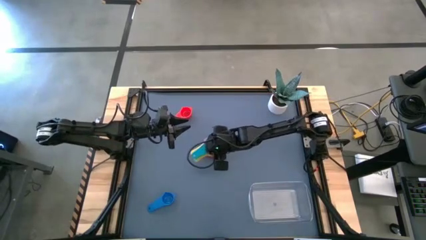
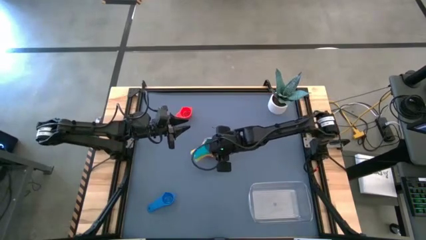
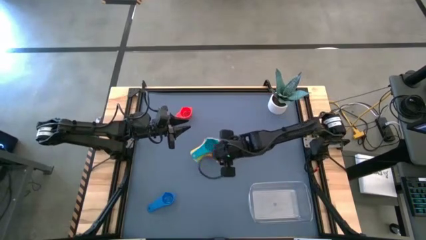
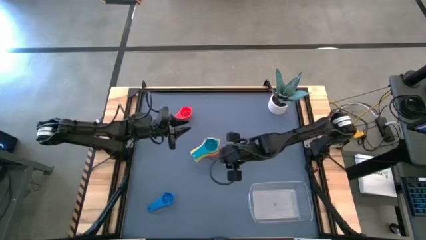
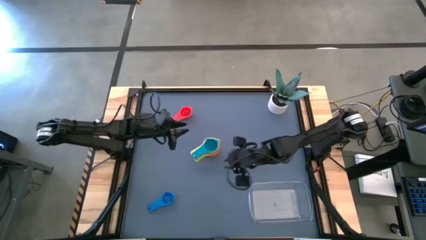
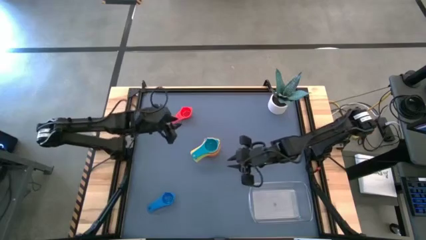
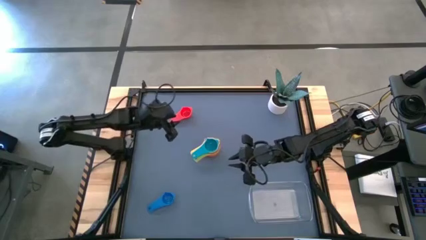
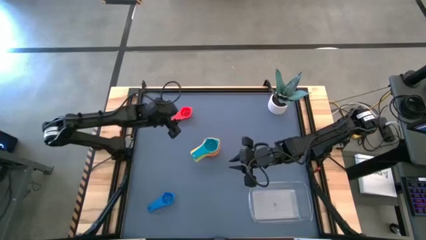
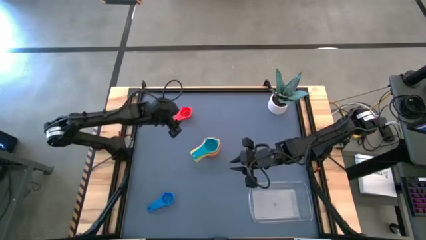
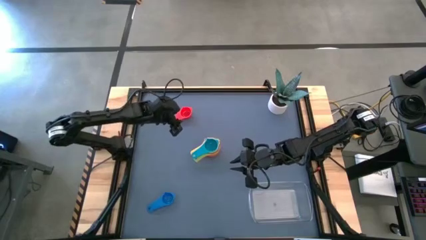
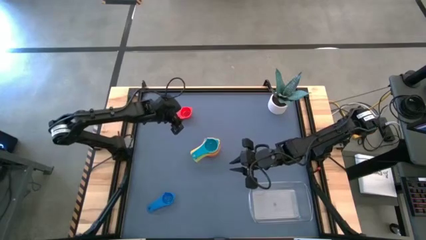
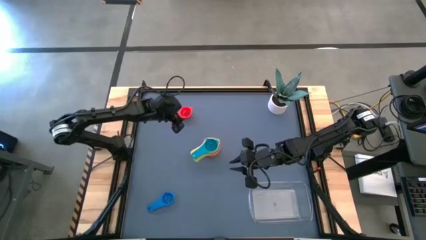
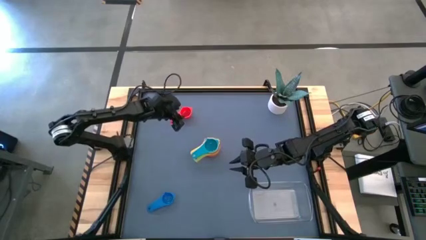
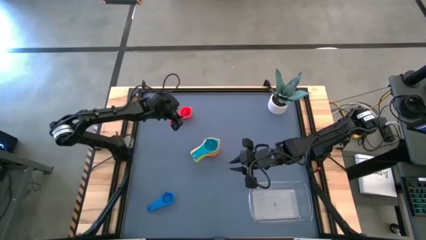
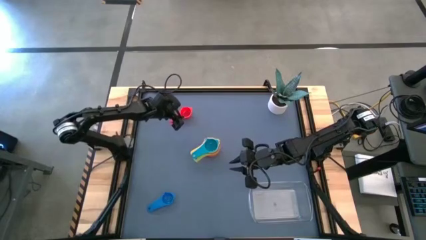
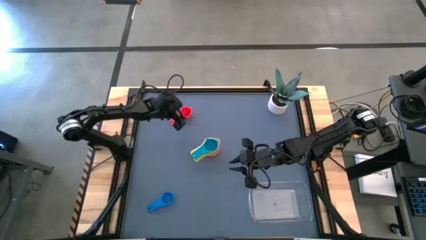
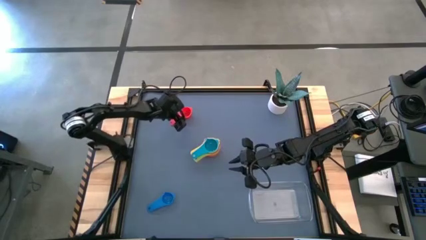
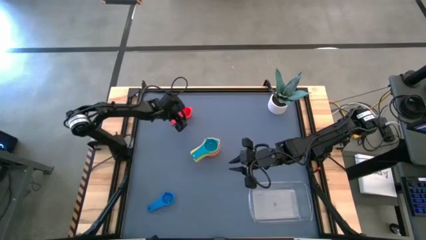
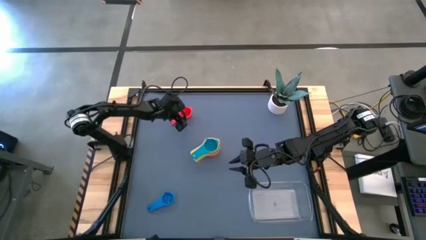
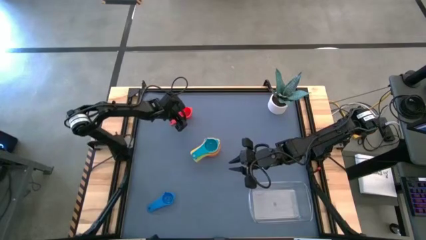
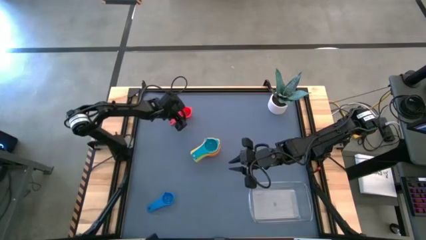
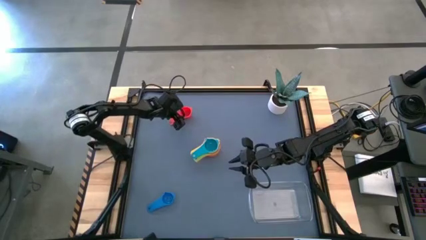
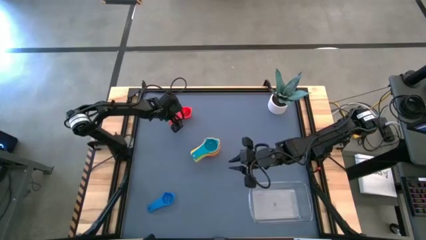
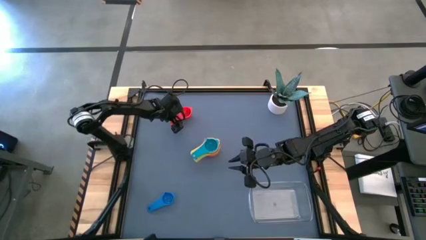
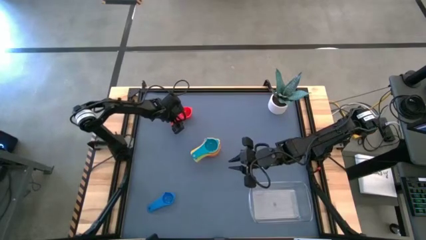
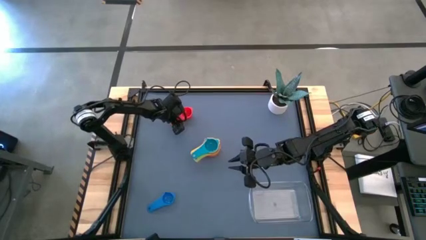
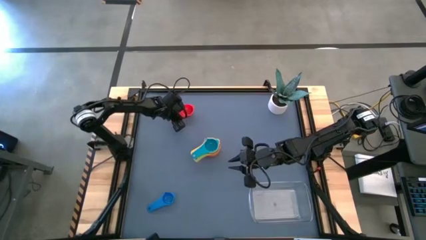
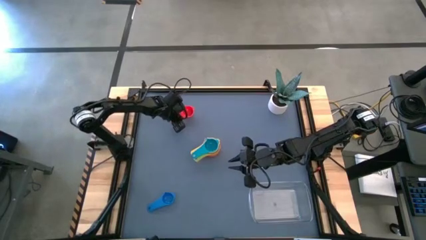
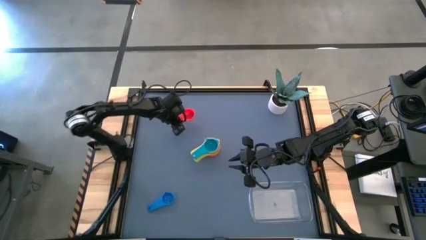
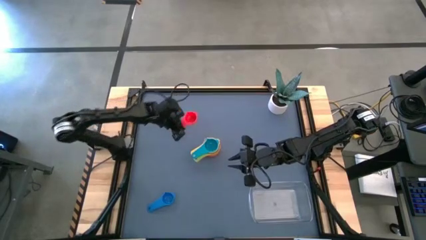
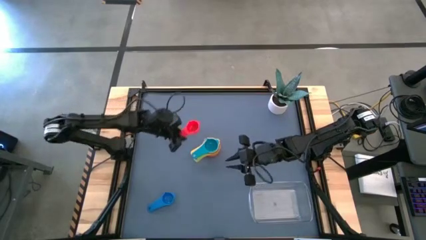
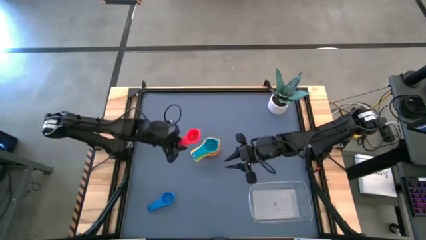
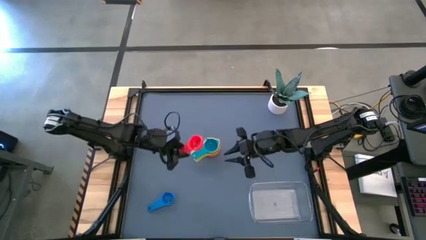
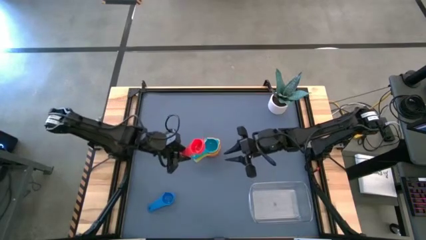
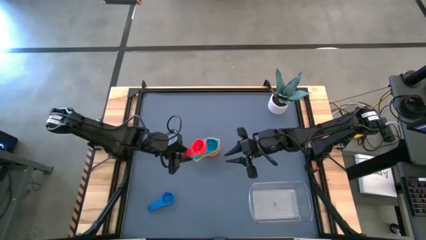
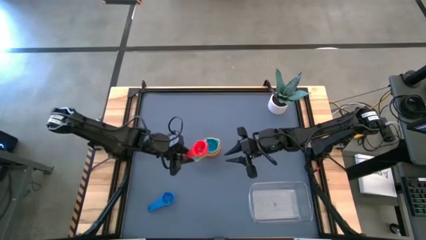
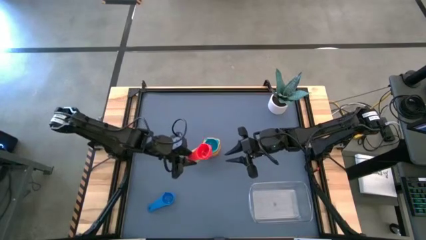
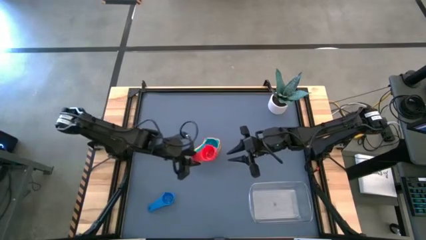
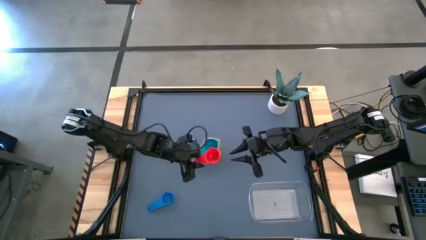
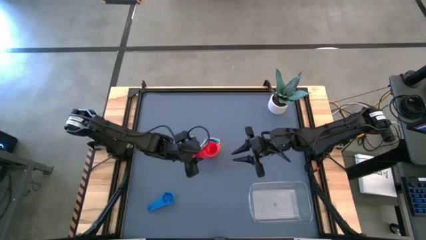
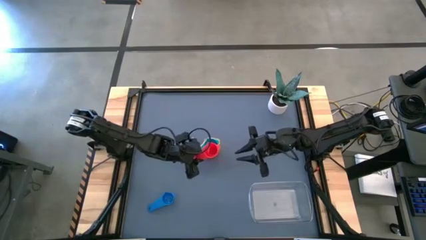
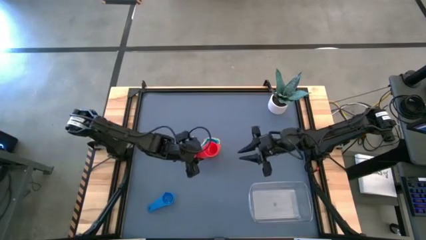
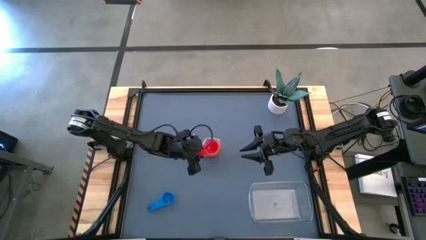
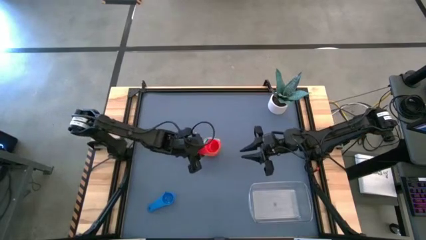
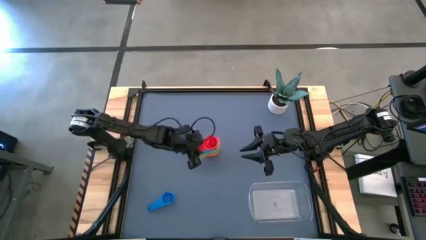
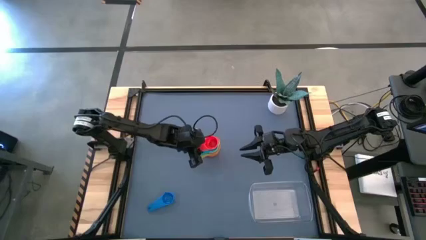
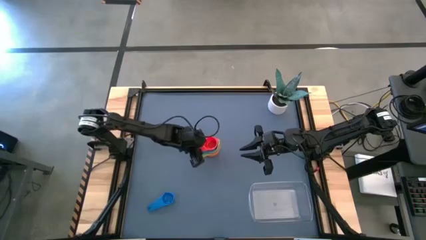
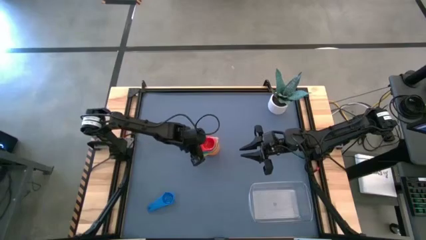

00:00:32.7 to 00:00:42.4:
Task: Nest measuring cups in basket
Stack the red measuring cup on top of the light blue measuring cup

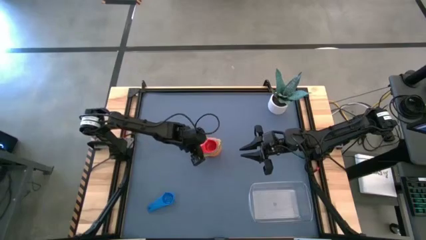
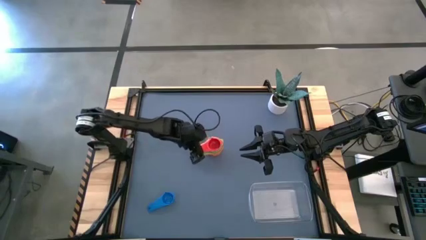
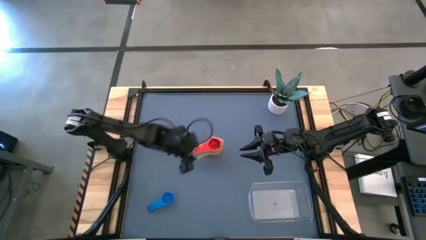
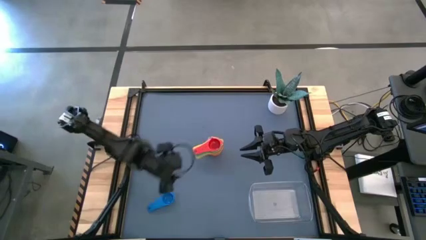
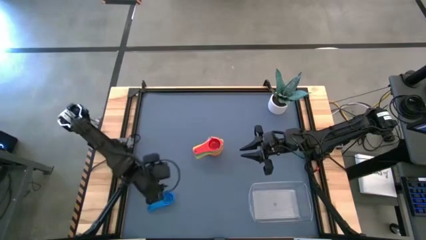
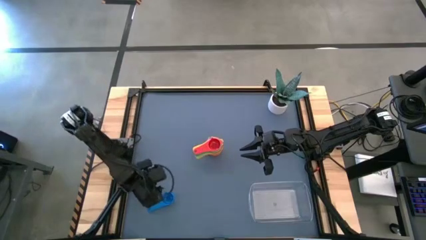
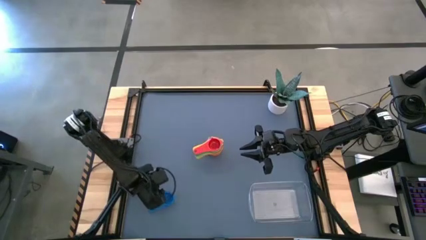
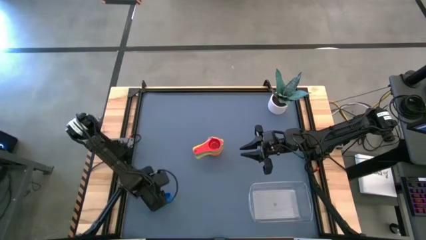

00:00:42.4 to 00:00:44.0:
Stack the blue measuring cup on top of the red measuring cup

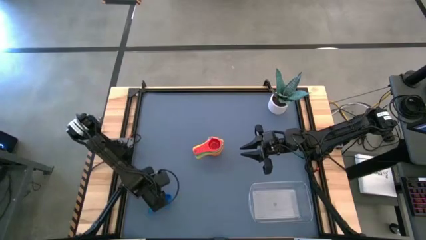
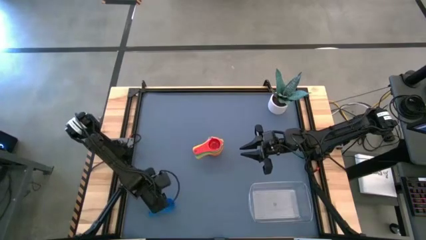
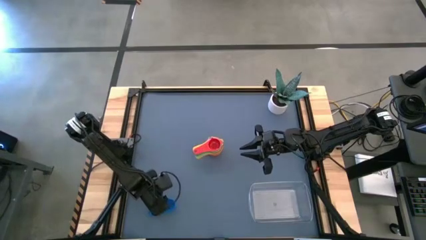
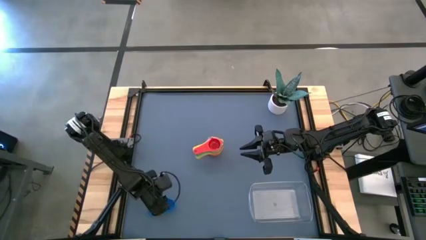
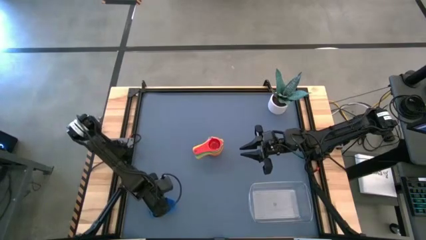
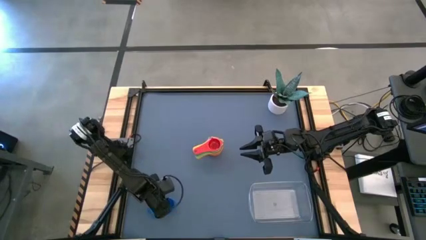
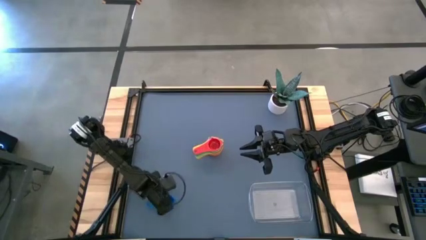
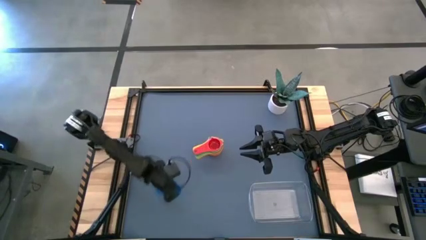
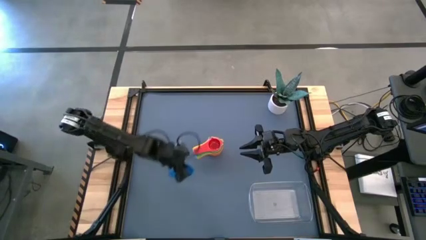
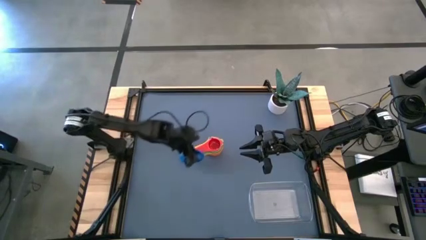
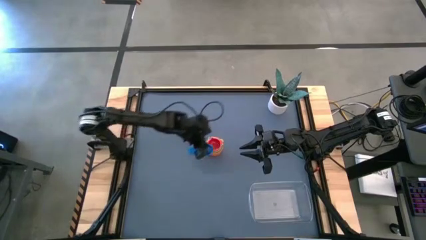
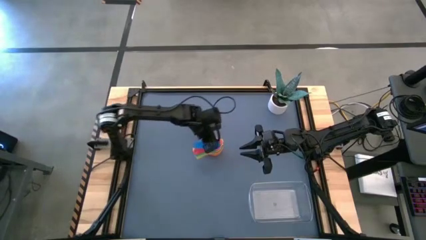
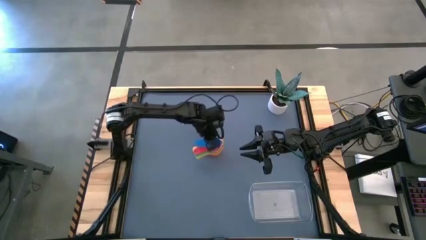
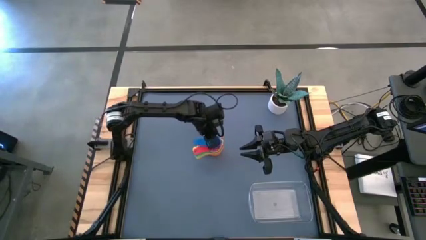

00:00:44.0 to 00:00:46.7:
Stack the blue measuring cup on top of the red measuring cup
